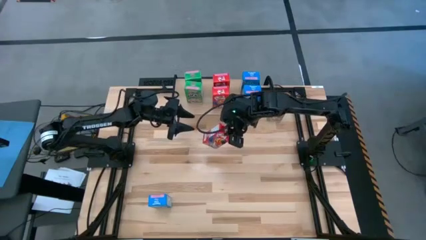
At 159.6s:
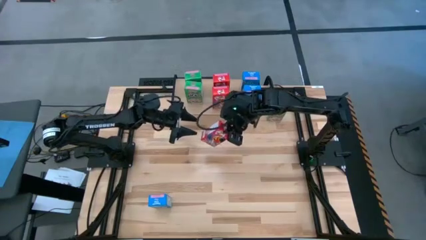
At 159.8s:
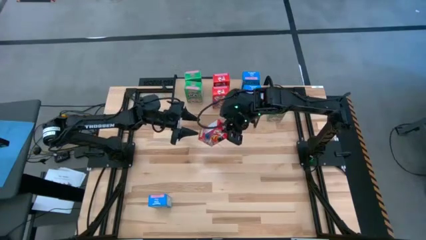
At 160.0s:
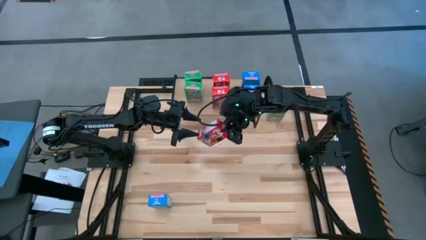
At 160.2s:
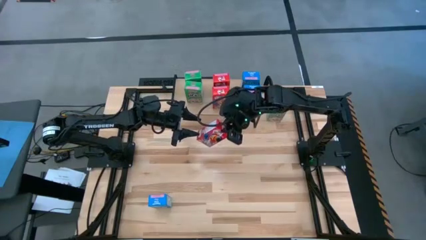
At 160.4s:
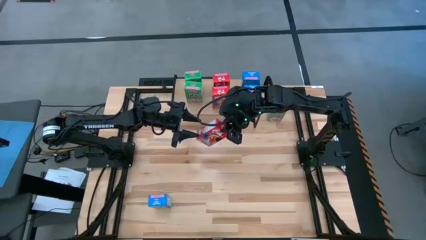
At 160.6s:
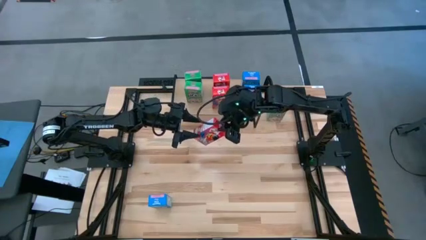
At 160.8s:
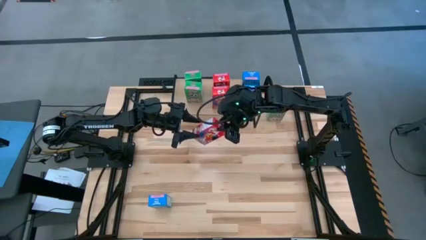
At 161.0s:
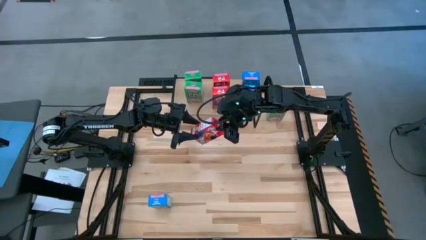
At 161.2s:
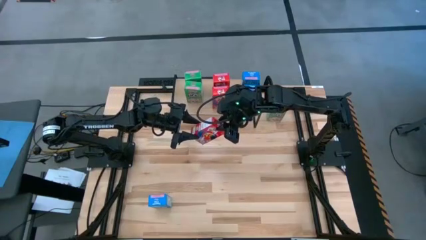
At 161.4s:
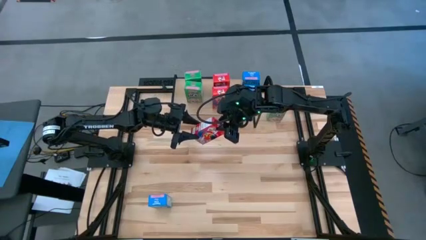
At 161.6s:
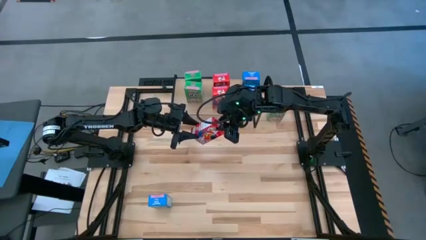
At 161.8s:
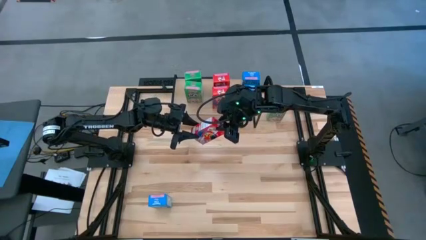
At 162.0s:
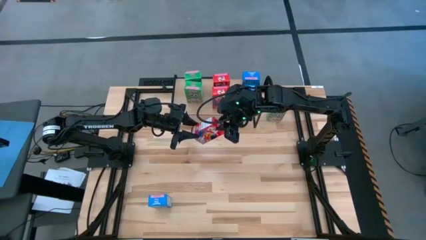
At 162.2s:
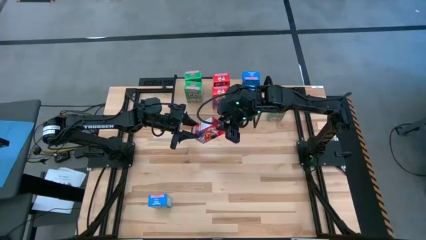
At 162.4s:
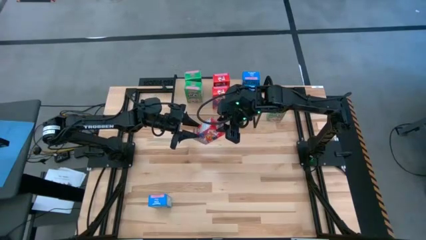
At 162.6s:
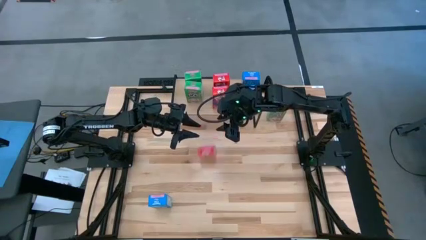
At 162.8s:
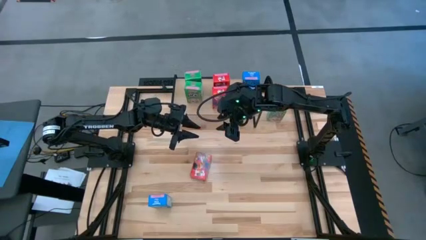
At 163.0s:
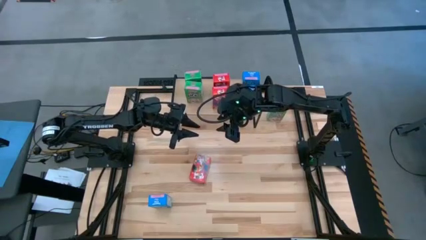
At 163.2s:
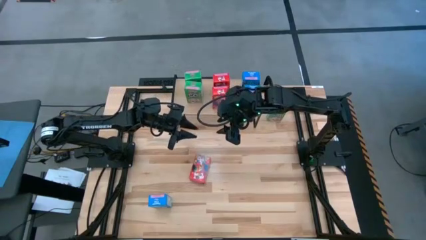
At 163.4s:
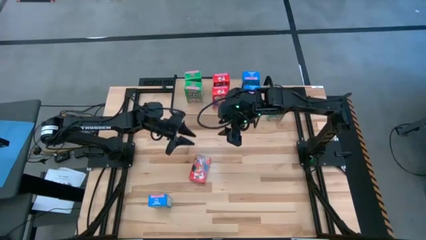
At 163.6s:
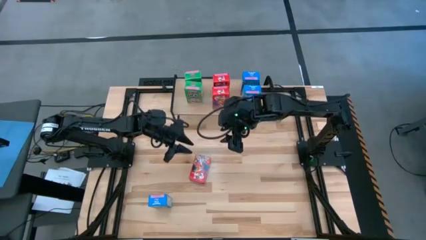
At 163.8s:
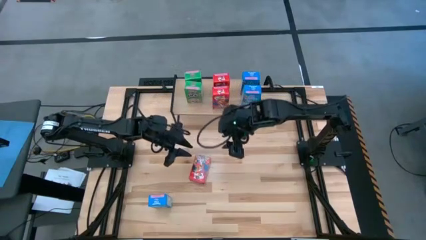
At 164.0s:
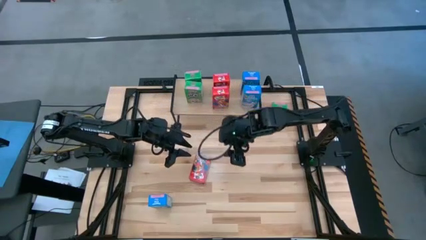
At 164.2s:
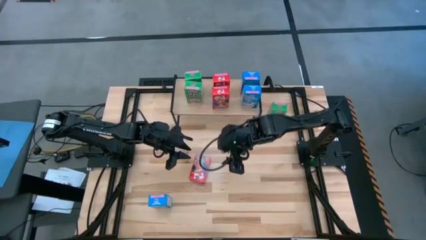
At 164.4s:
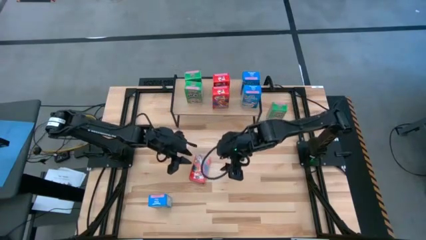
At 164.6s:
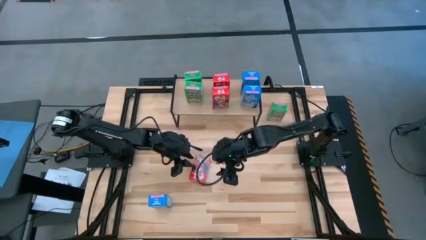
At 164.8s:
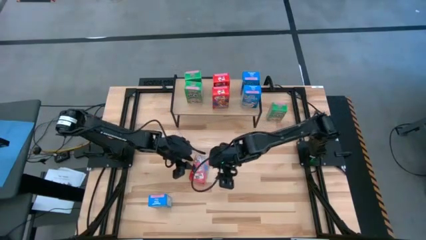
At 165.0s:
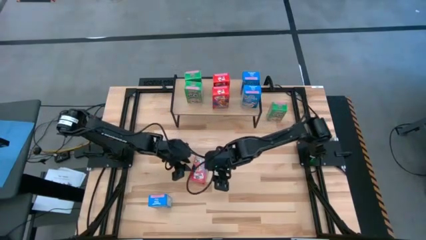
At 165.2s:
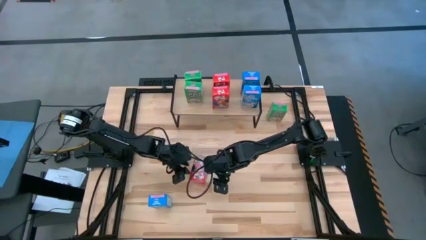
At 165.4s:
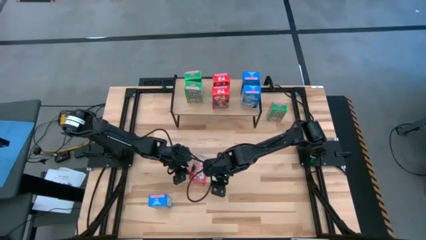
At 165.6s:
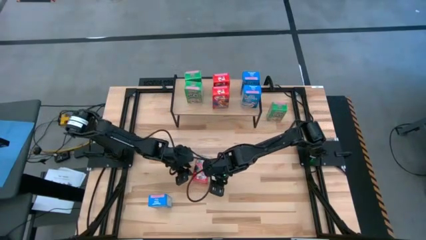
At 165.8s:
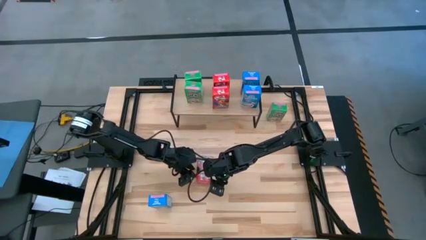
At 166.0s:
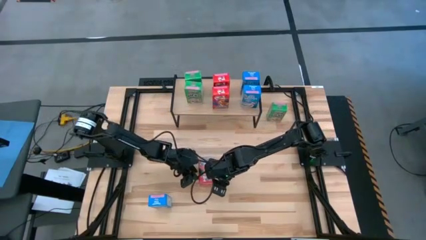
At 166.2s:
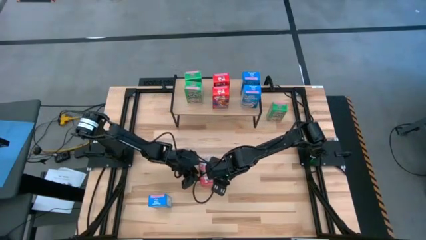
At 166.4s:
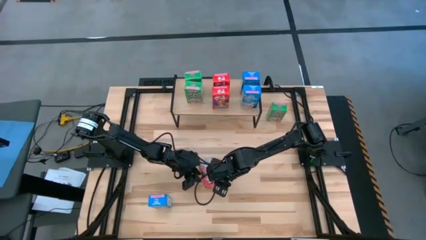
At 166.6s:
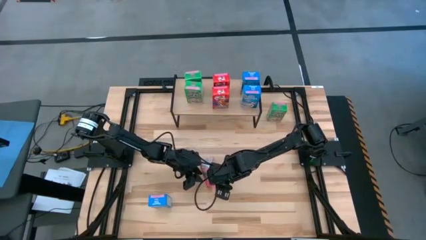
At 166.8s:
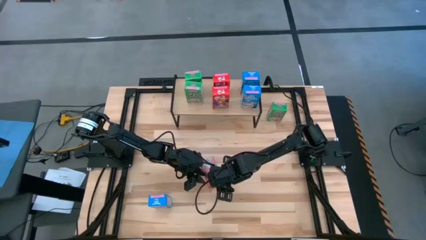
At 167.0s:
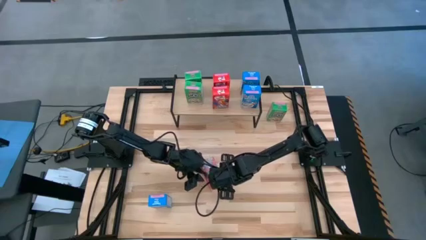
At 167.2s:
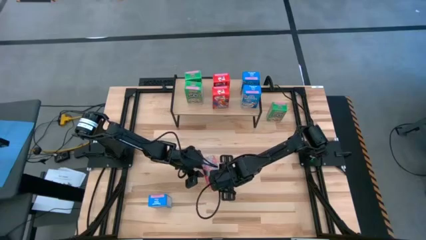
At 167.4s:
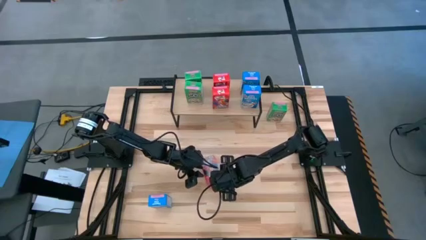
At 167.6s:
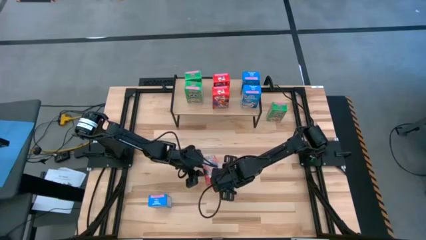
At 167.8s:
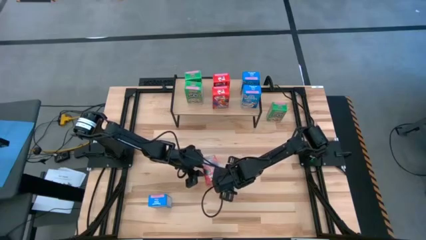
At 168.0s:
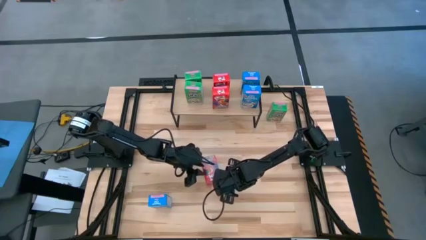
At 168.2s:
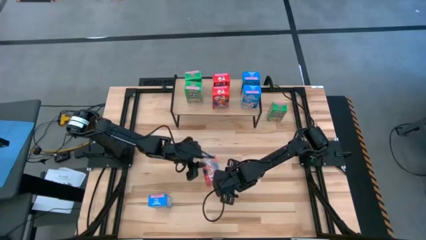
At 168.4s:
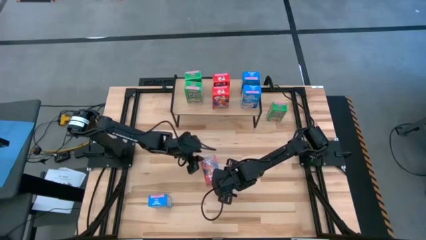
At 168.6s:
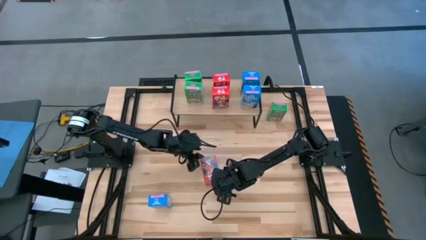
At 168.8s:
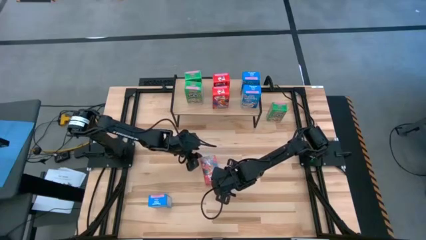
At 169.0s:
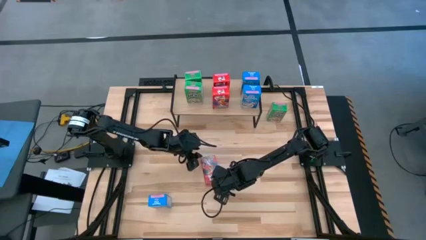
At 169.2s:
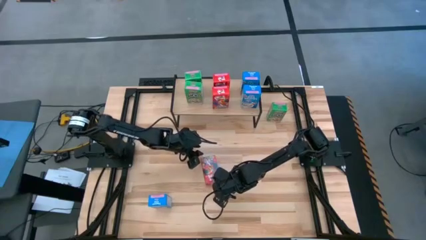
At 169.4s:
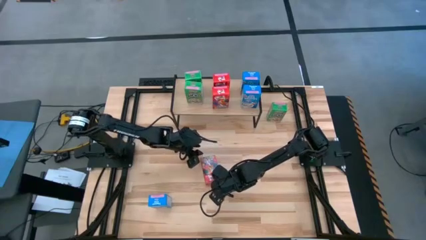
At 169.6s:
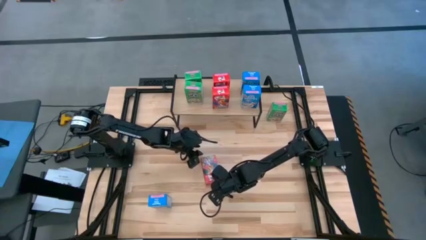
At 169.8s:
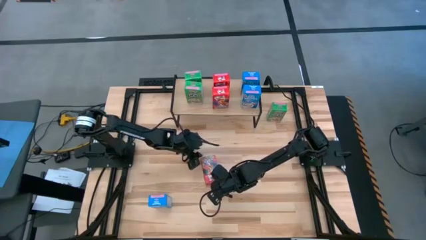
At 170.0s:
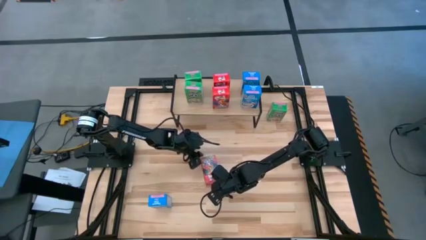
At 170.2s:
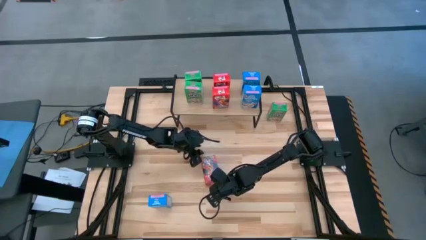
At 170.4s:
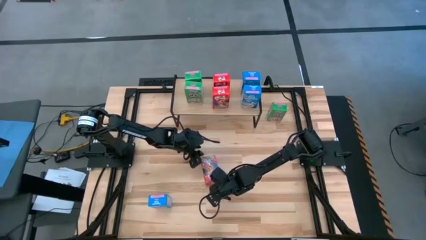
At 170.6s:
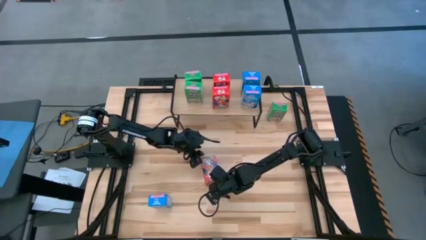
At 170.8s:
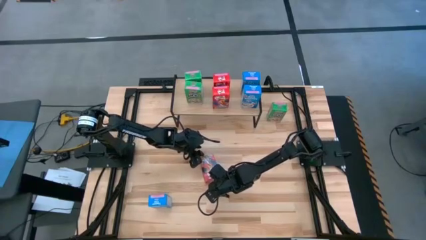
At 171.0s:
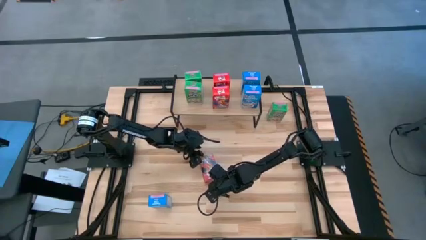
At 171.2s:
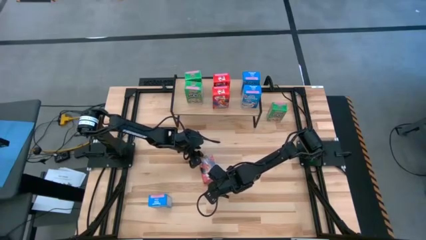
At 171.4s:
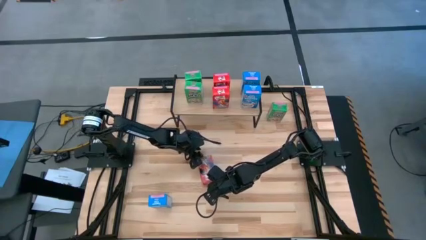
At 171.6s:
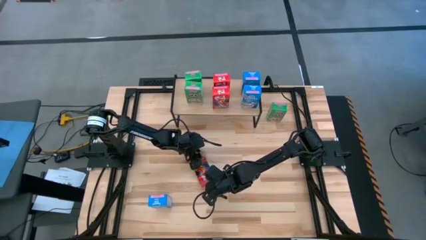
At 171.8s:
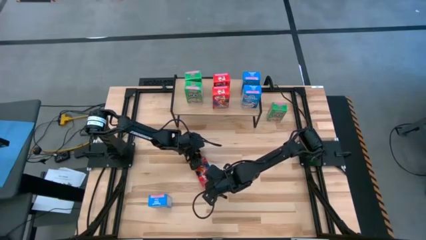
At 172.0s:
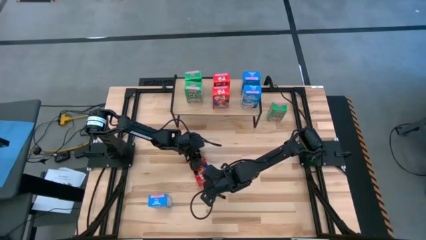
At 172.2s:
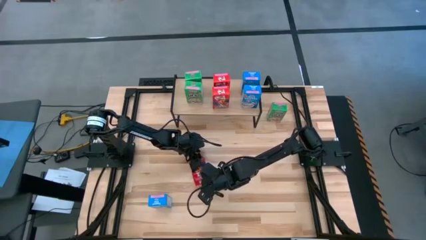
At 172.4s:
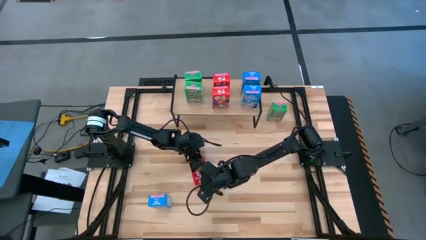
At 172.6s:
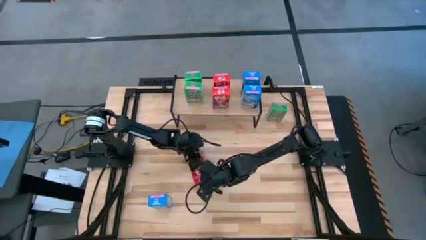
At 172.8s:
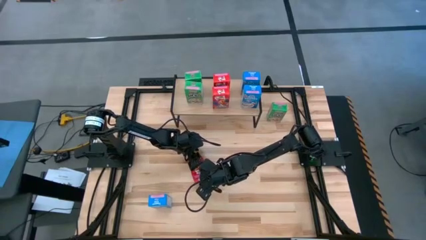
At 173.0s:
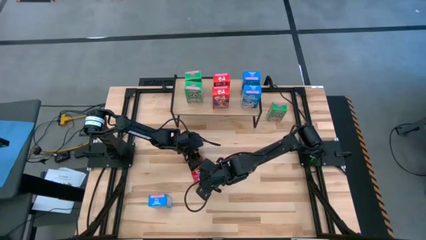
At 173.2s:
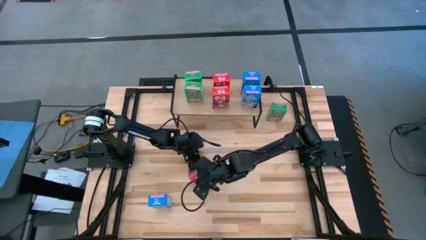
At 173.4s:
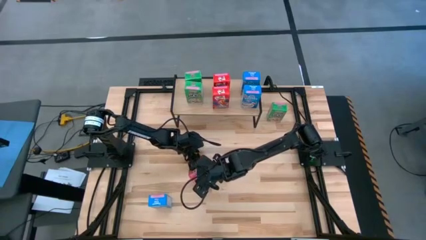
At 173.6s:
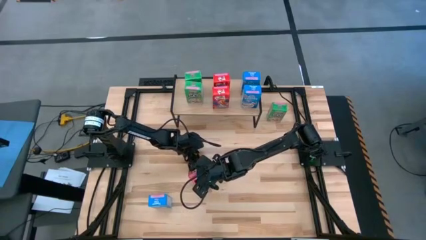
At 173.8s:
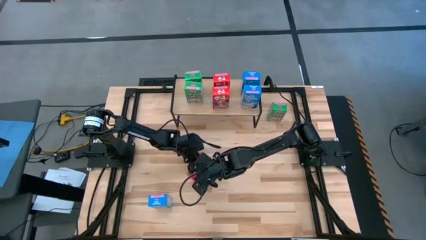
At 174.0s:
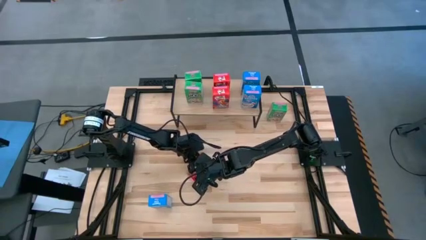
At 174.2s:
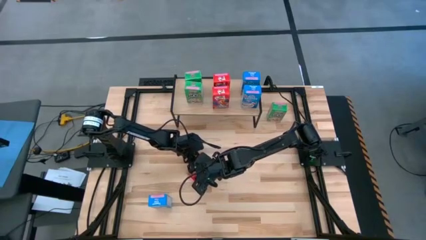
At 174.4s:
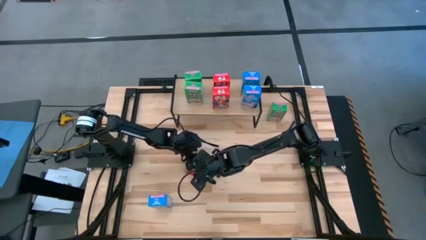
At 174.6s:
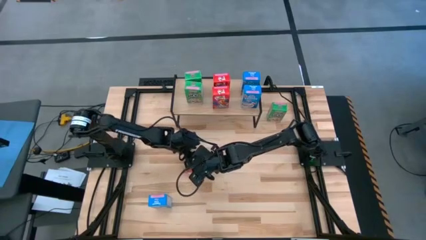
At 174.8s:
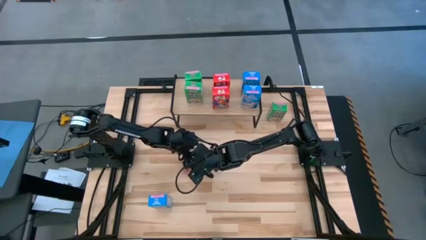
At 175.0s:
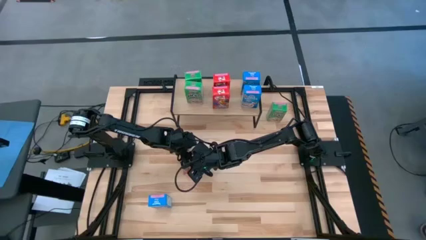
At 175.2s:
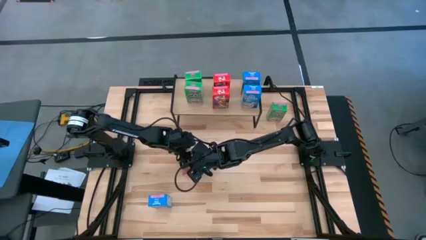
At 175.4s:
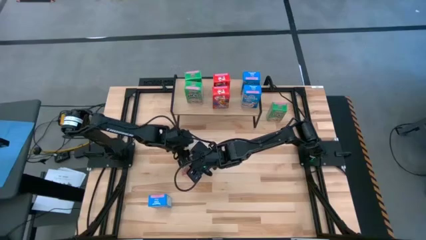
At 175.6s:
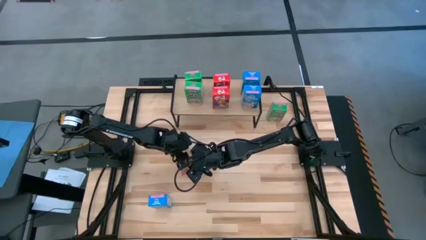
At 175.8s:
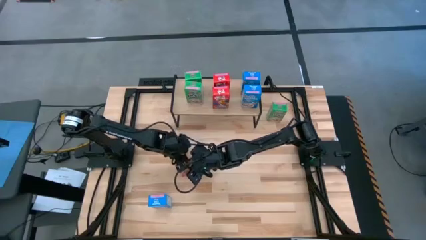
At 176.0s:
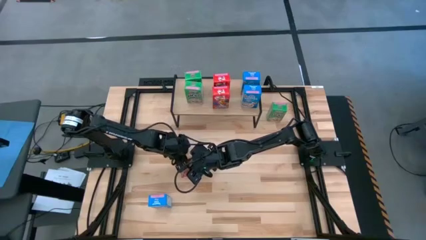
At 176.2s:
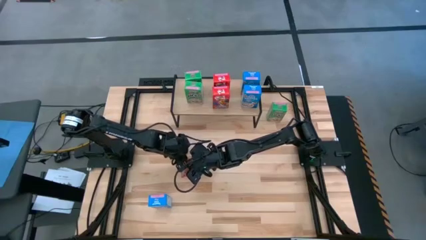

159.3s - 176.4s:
Task: Stack cereal on shelf
Put the red cereal box on the shelf aligned with the other red cereal boxes
